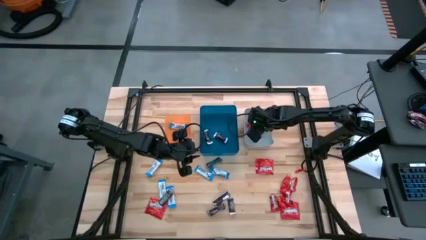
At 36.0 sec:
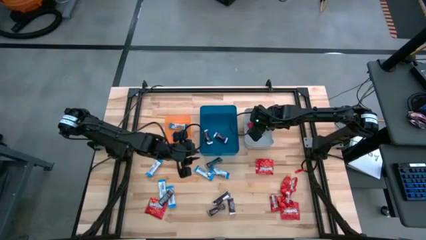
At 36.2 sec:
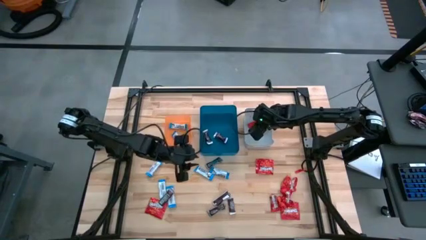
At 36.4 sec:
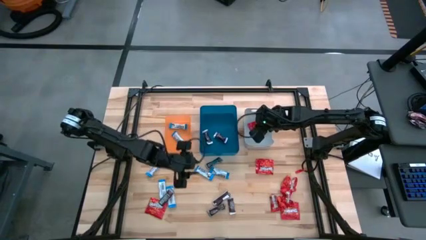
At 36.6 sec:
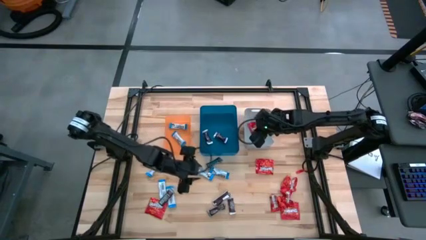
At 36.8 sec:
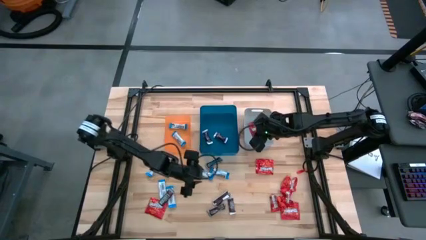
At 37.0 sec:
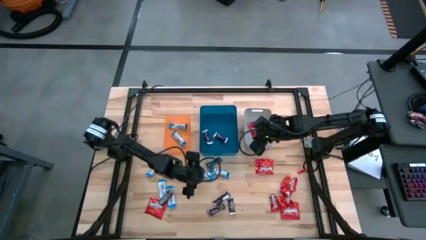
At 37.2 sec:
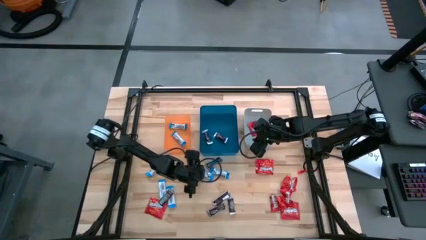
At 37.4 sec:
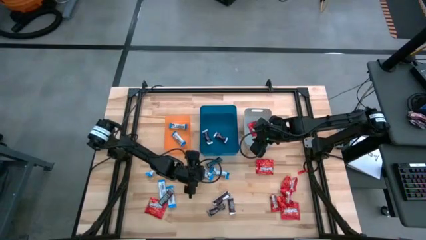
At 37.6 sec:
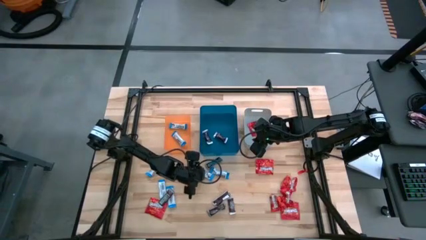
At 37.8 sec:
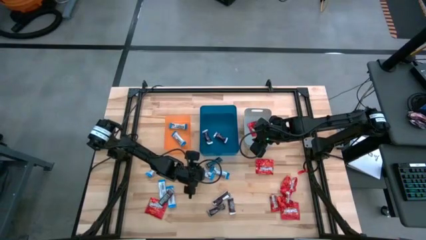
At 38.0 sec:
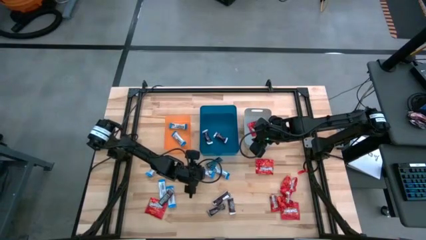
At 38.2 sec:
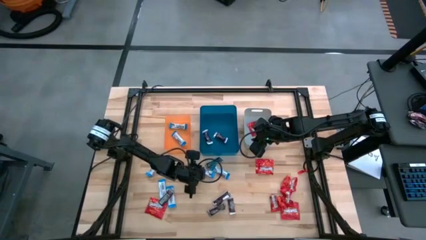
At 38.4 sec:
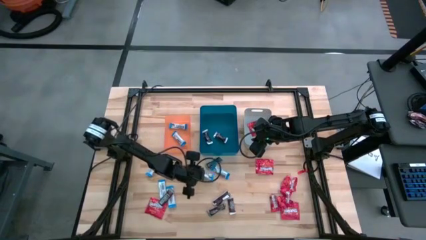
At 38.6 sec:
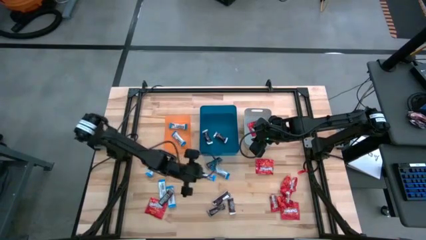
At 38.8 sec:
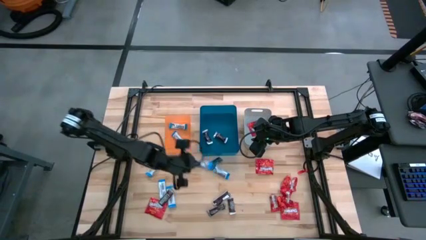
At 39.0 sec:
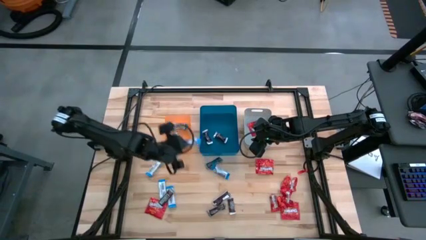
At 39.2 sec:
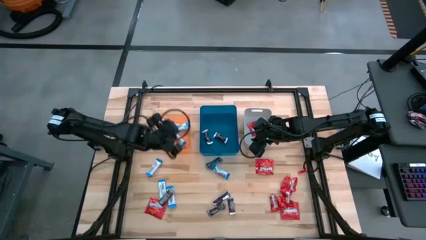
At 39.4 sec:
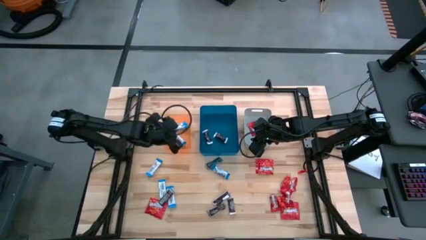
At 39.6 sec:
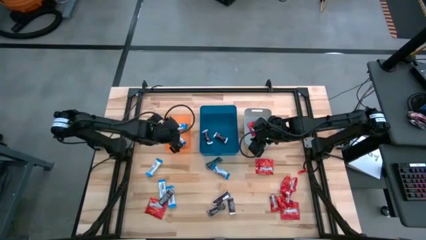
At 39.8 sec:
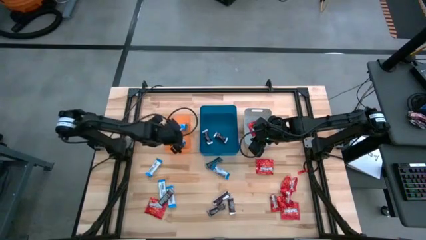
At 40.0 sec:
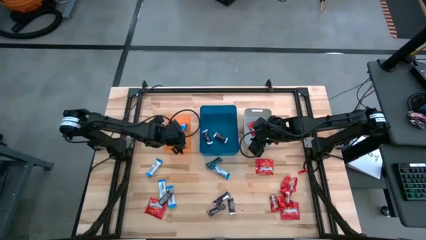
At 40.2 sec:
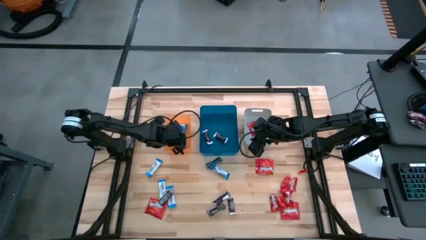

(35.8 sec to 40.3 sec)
Task: Sort candy
Put the white chocolate bar into the orange bin

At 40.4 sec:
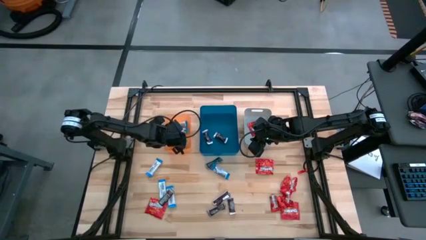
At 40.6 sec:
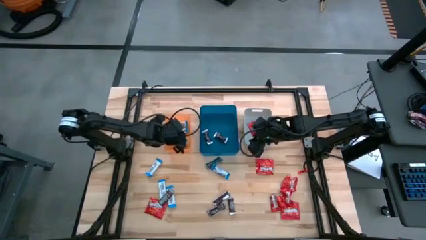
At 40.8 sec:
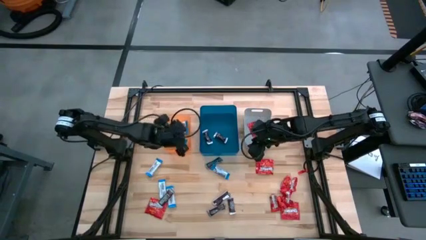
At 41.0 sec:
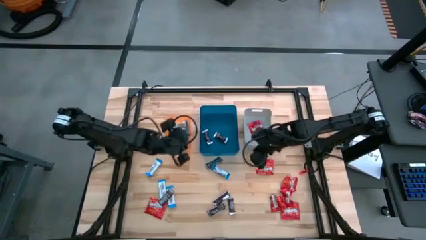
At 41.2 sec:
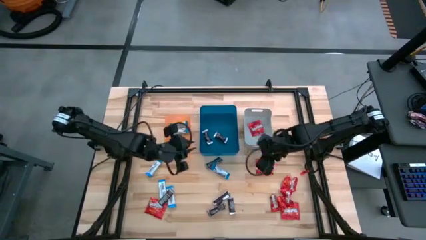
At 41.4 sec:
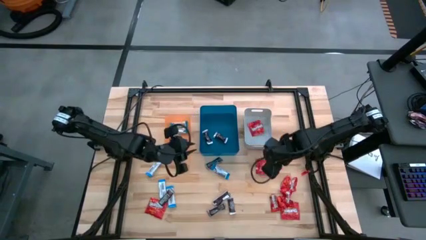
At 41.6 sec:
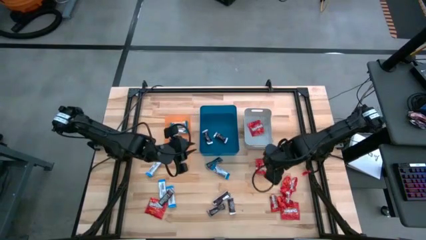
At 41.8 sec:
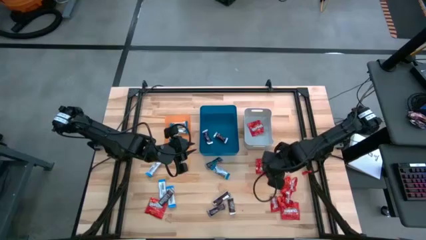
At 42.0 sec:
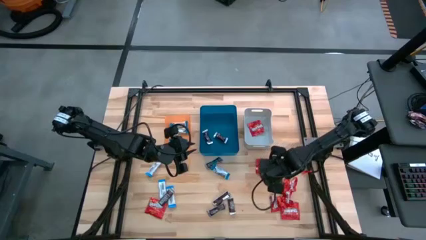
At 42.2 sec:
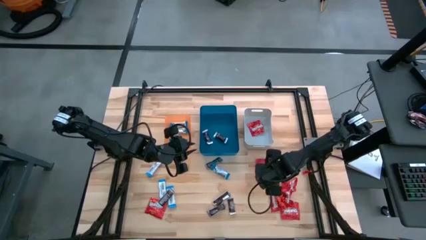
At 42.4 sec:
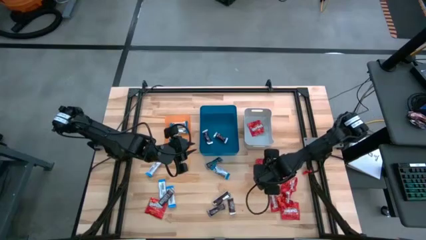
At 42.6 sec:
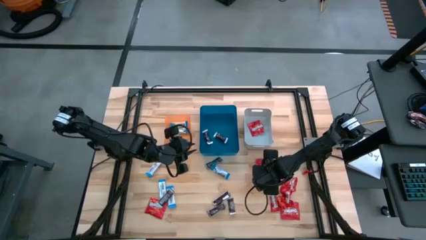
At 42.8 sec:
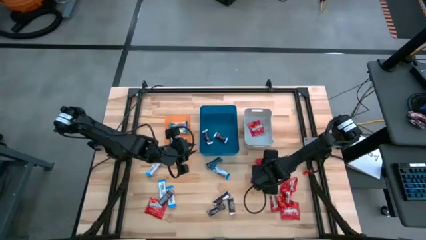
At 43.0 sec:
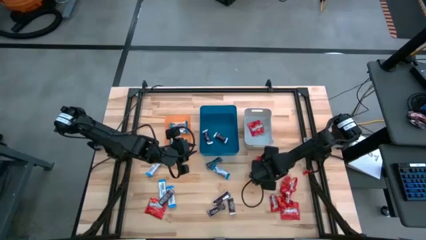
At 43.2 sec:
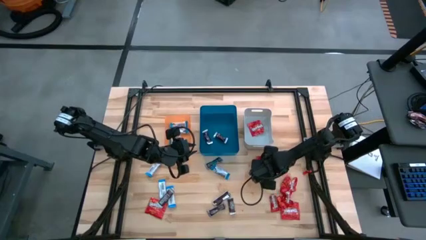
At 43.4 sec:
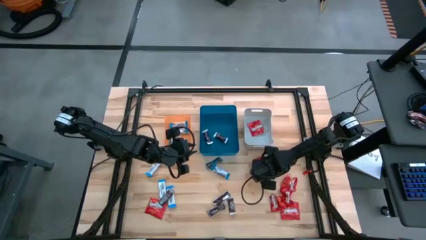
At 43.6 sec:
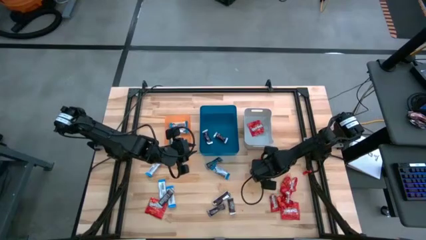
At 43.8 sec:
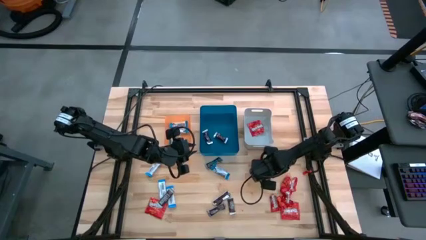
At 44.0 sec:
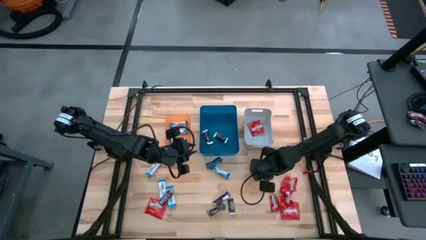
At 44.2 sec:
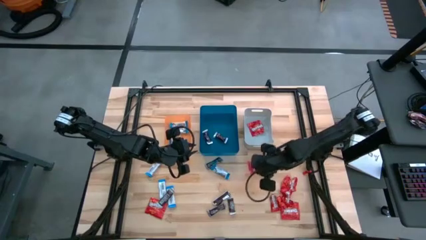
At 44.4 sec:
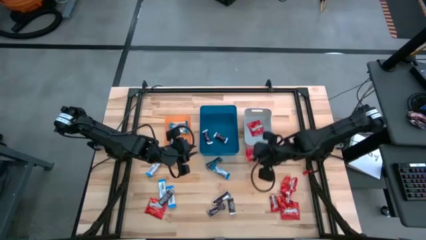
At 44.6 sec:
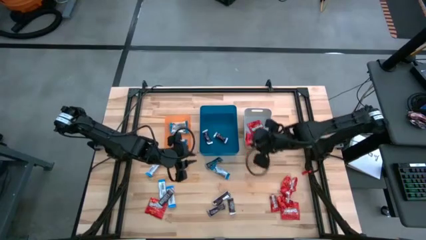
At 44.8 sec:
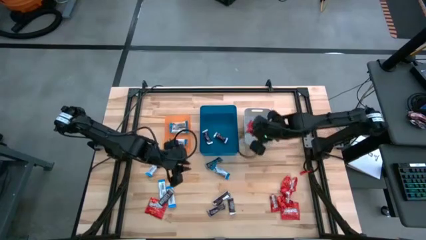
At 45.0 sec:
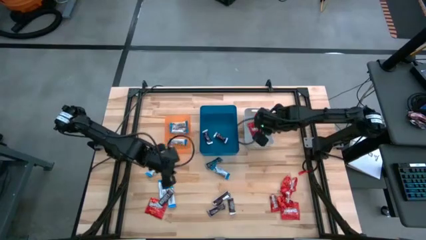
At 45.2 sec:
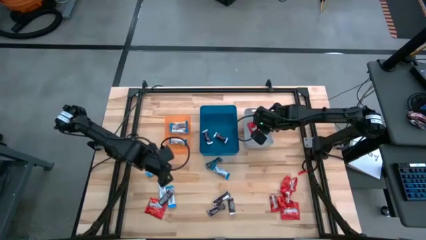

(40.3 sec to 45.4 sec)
Put the red candy into the gray bin

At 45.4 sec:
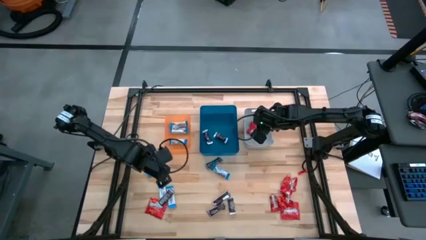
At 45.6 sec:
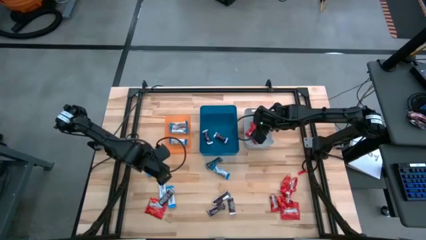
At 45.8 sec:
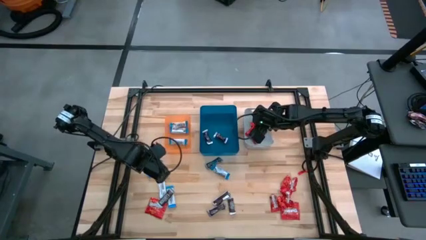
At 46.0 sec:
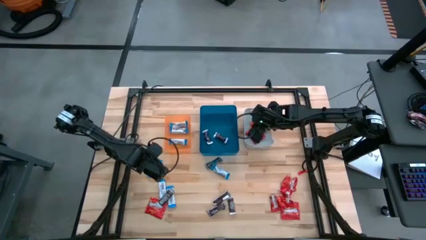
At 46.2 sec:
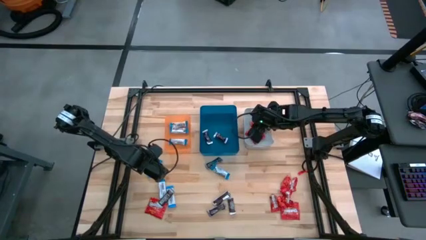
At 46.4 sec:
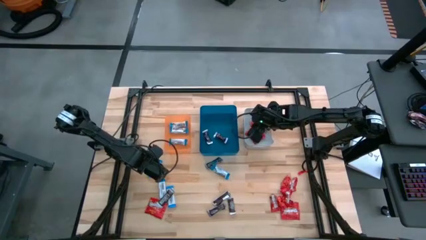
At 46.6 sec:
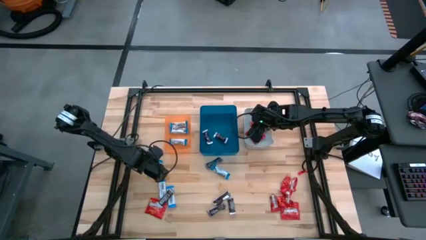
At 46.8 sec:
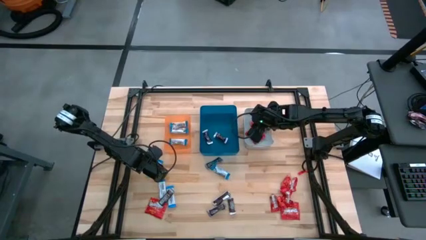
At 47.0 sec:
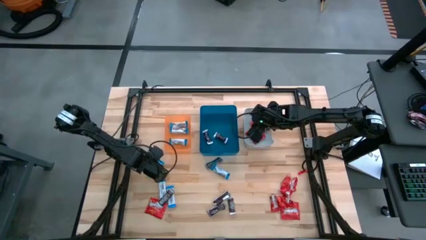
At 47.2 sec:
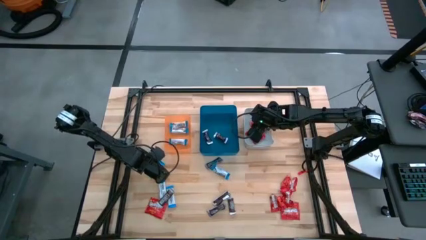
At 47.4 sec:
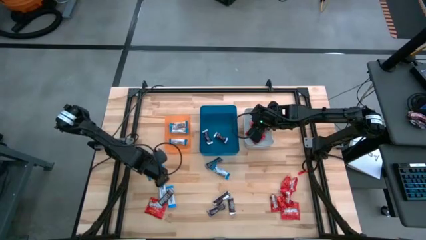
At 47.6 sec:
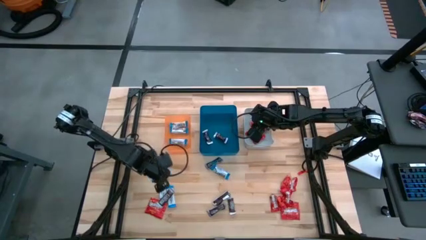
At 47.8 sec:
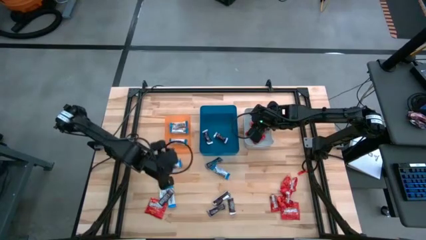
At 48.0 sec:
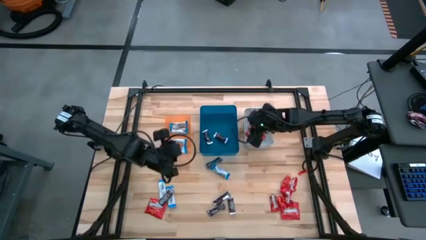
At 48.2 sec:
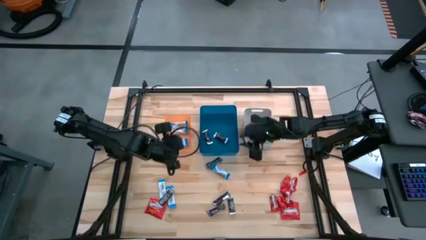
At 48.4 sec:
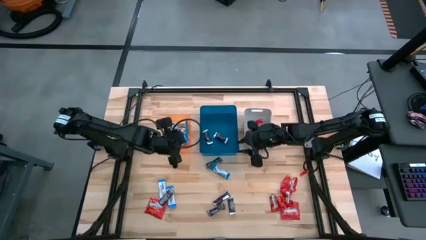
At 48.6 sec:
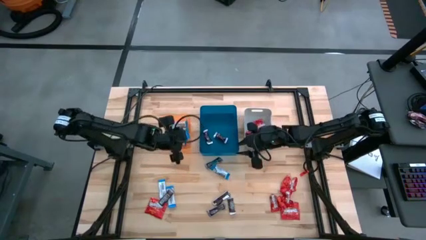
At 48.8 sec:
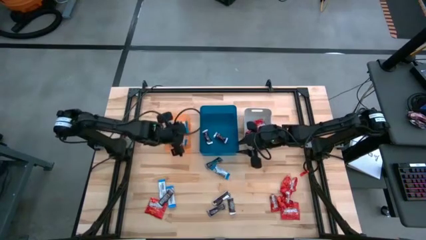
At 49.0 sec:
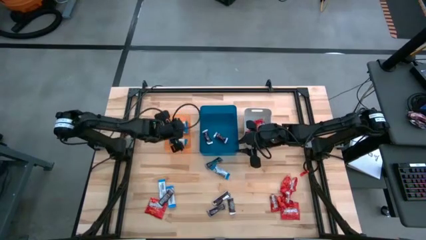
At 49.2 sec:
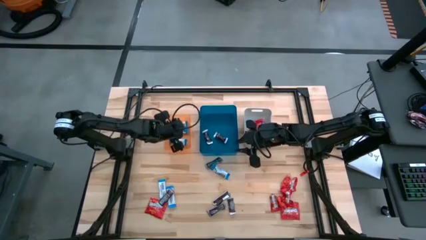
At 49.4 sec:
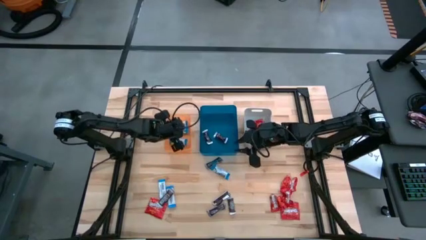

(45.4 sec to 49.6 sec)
Put the white chocolate bar into the orange bin

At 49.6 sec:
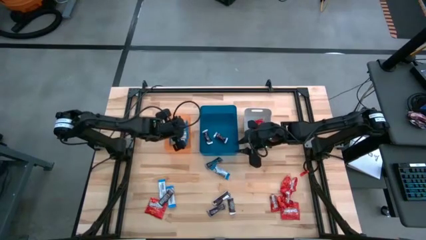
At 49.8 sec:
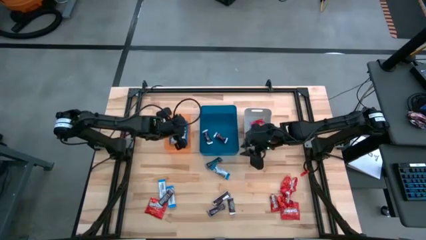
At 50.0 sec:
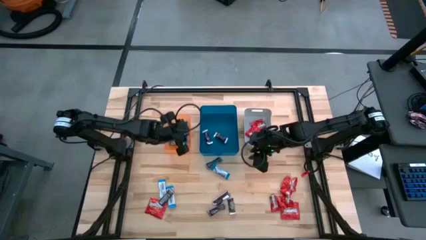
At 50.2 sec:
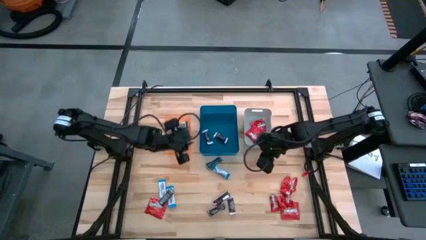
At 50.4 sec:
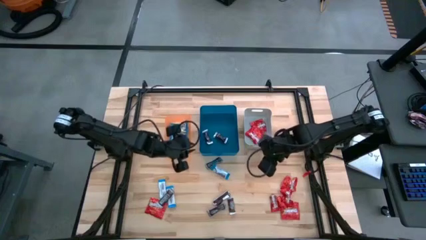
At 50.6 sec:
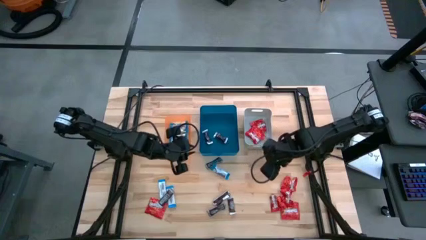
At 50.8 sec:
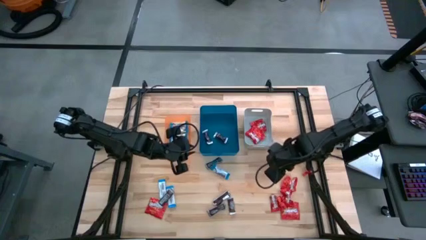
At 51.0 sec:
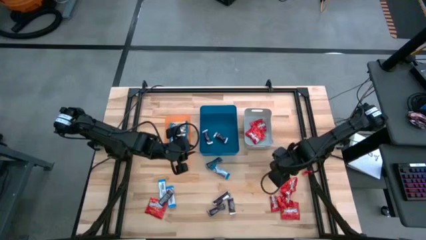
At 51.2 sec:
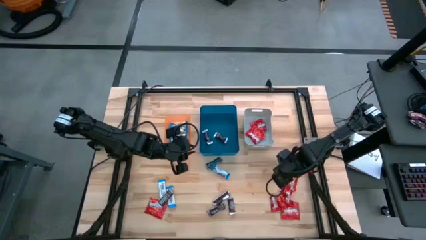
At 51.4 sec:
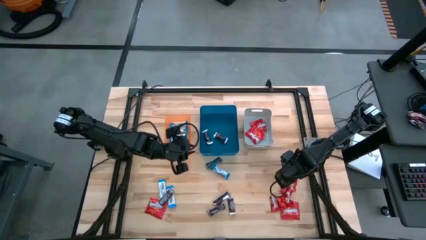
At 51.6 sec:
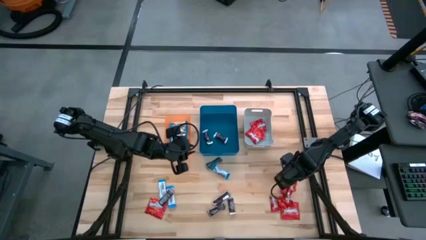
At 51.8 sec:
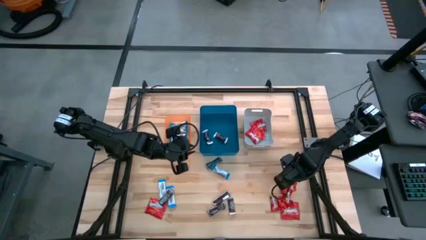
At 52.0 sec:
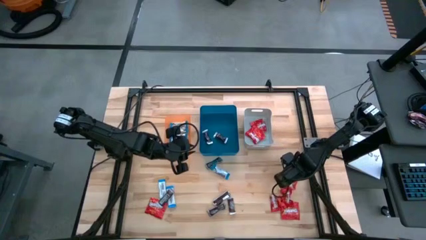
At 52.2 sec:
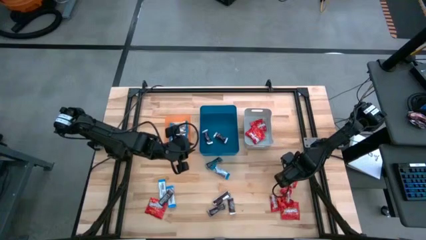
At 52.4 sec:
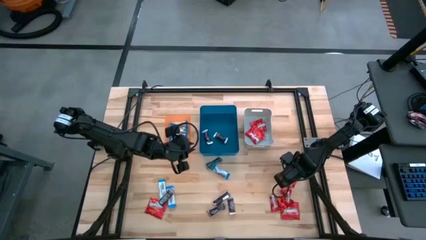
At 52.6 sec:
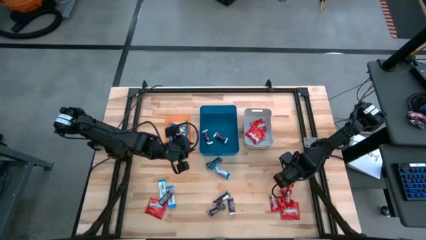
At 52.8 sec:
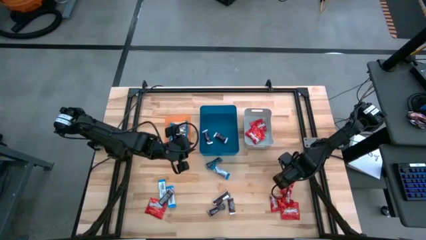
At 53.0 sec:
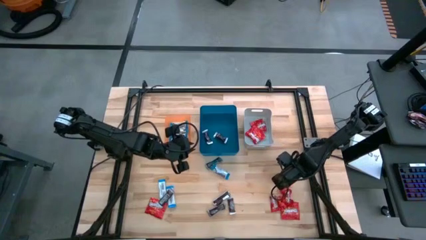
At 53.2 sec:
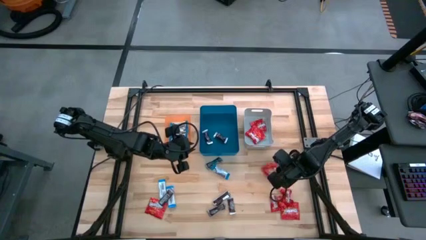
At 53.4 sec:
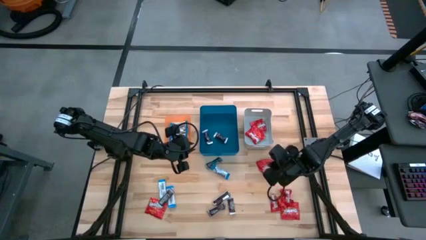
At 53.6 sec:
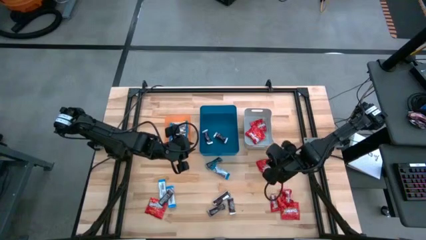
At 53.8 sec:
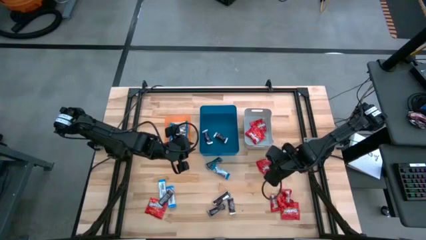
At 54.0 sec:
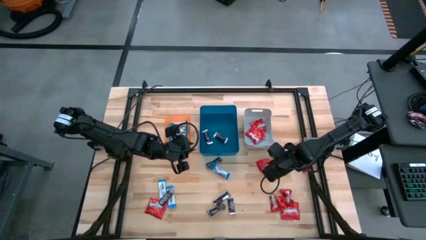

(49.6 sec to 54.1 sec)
Put the red candy into the gray bin
